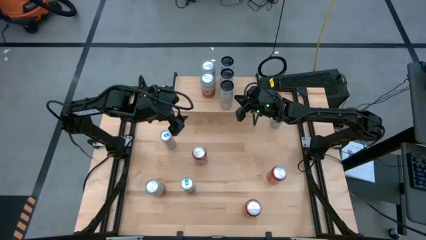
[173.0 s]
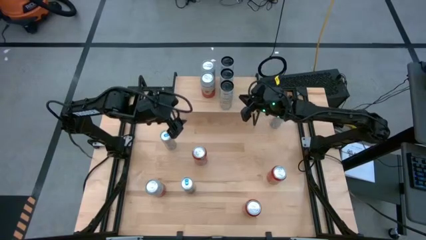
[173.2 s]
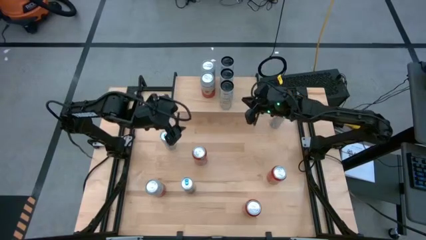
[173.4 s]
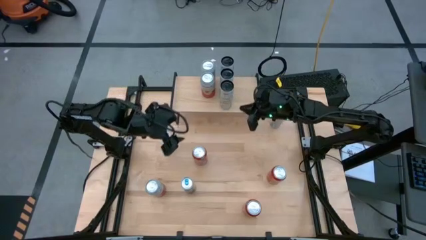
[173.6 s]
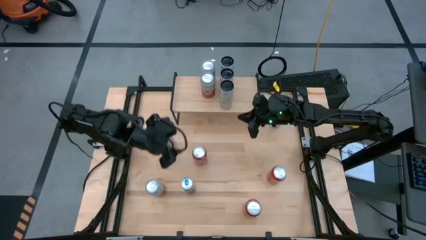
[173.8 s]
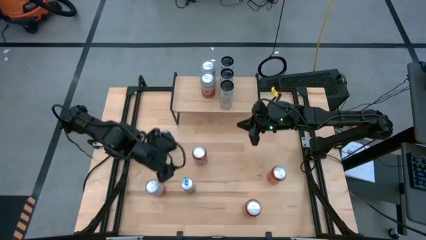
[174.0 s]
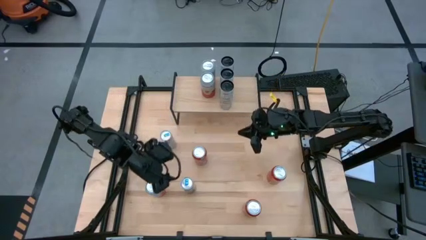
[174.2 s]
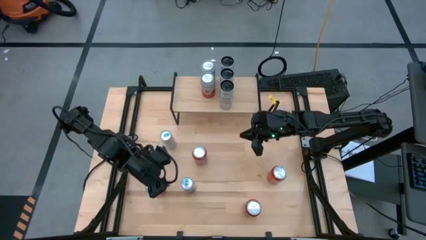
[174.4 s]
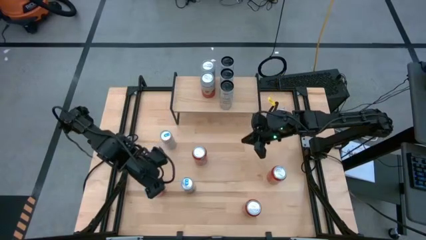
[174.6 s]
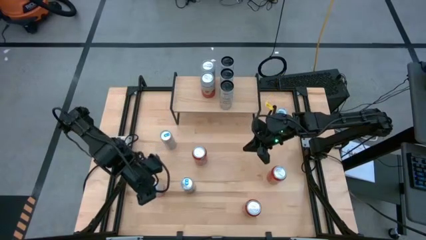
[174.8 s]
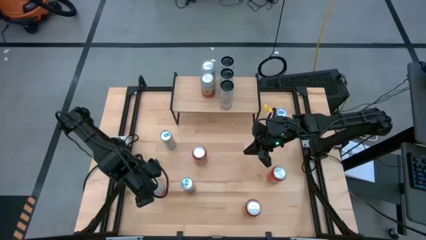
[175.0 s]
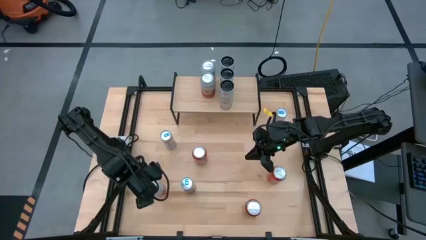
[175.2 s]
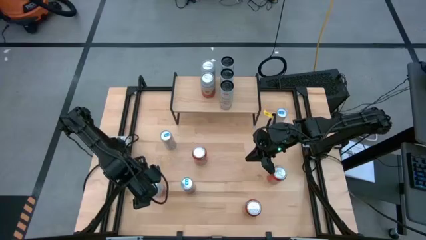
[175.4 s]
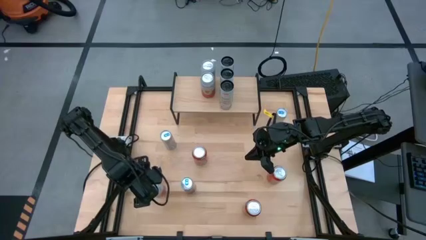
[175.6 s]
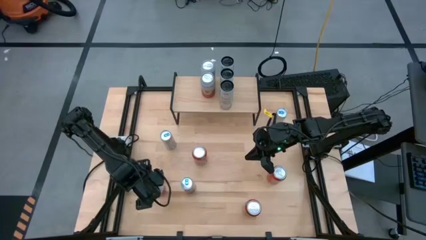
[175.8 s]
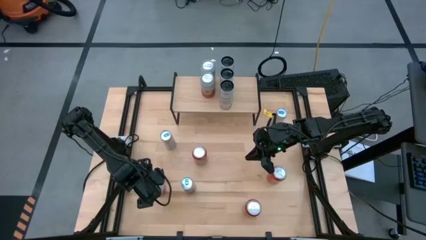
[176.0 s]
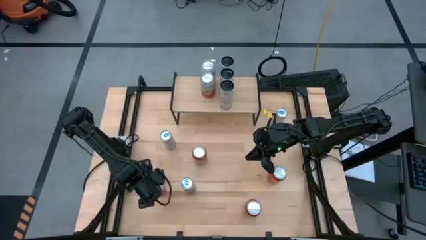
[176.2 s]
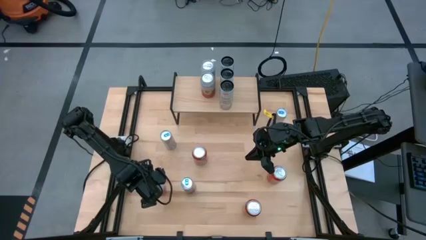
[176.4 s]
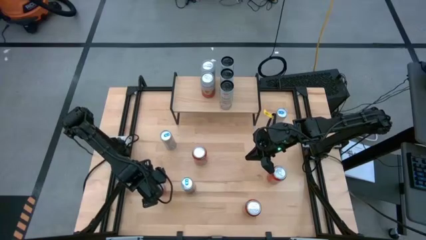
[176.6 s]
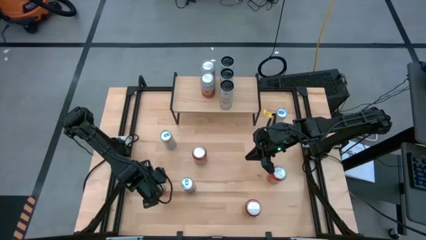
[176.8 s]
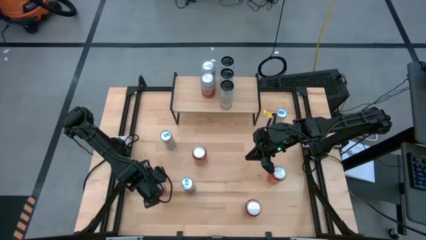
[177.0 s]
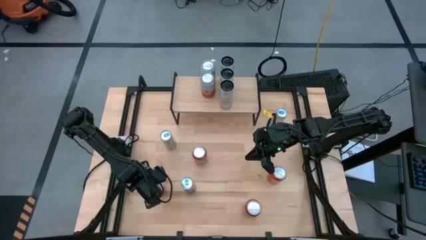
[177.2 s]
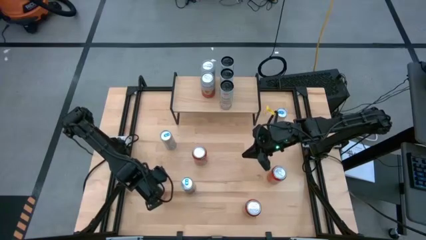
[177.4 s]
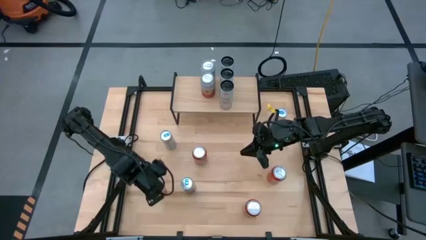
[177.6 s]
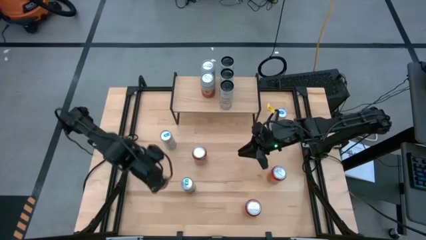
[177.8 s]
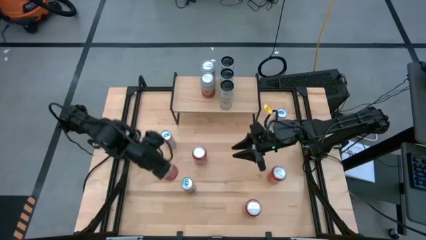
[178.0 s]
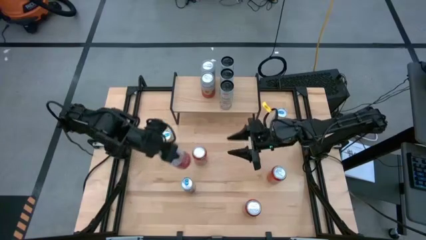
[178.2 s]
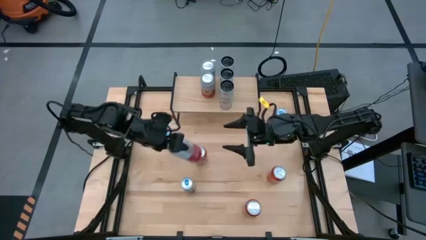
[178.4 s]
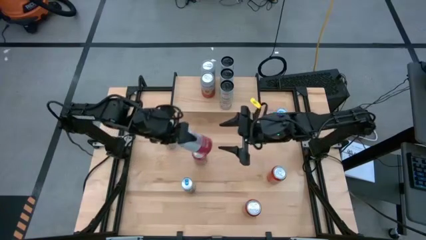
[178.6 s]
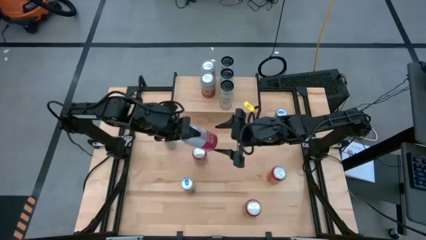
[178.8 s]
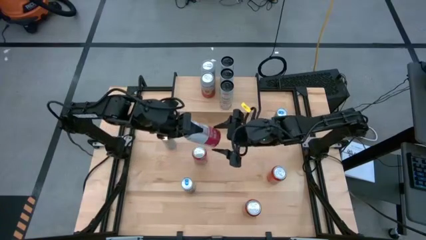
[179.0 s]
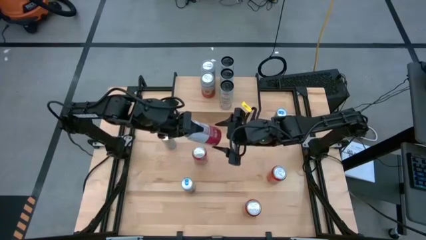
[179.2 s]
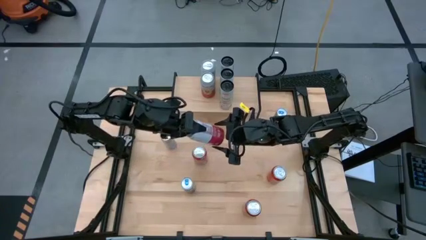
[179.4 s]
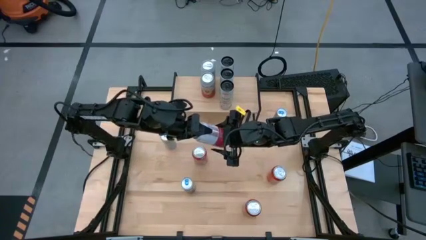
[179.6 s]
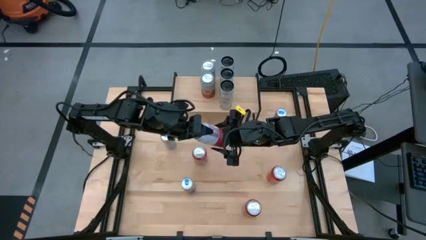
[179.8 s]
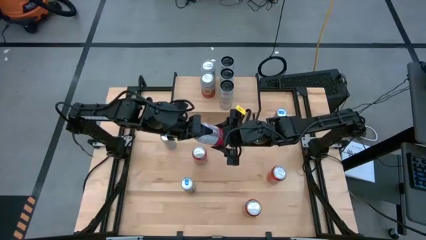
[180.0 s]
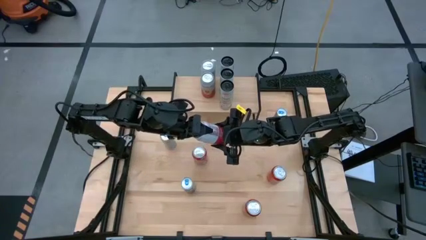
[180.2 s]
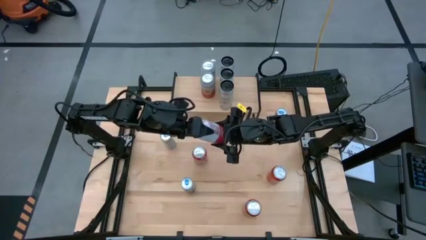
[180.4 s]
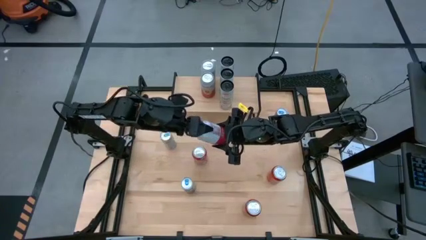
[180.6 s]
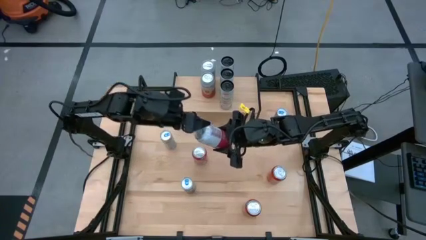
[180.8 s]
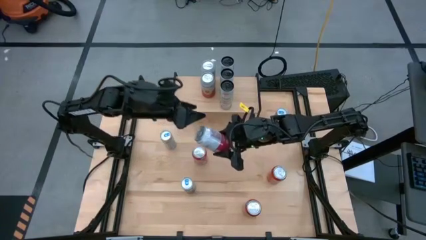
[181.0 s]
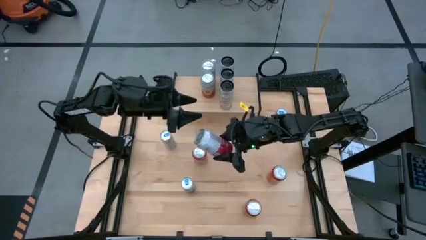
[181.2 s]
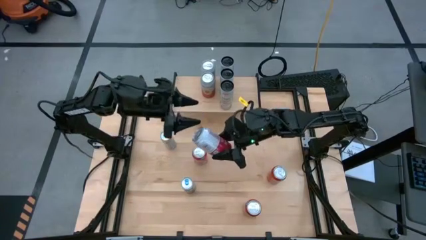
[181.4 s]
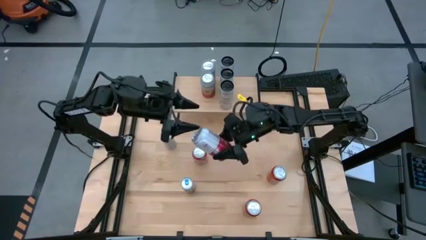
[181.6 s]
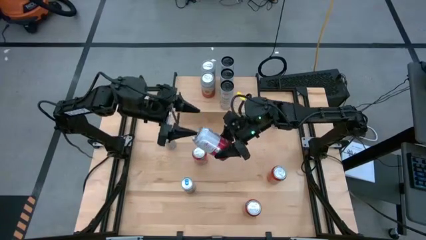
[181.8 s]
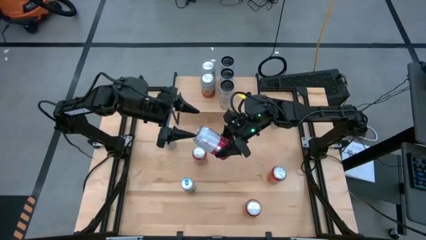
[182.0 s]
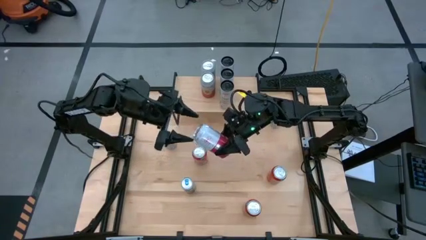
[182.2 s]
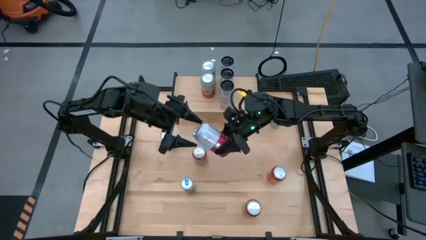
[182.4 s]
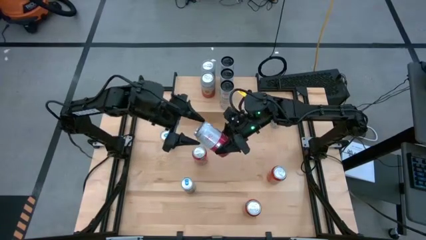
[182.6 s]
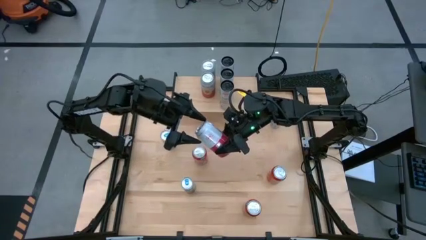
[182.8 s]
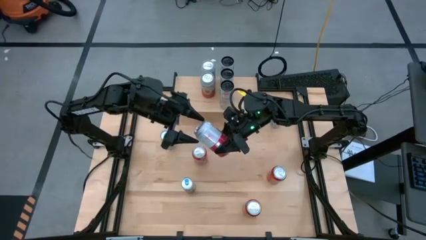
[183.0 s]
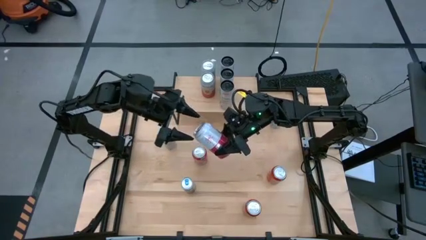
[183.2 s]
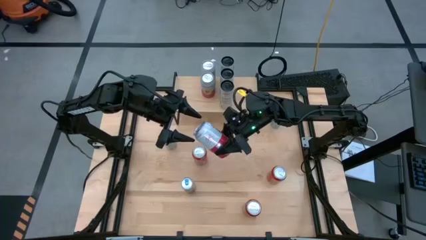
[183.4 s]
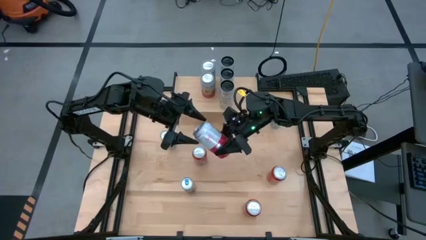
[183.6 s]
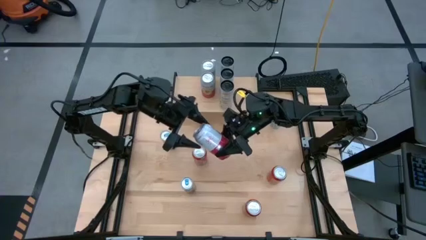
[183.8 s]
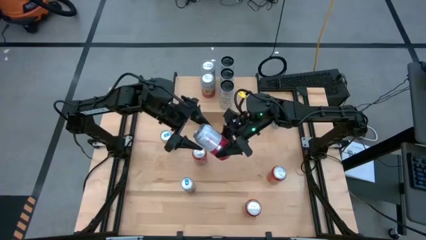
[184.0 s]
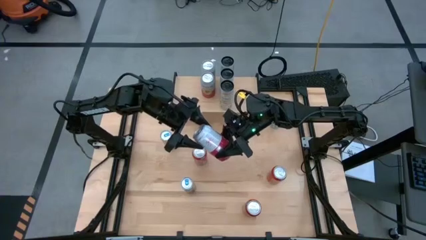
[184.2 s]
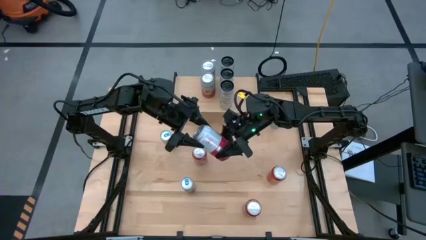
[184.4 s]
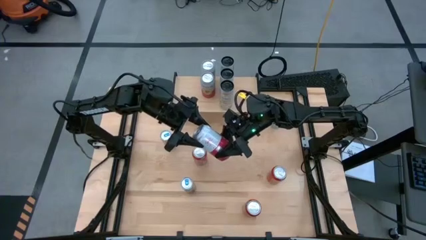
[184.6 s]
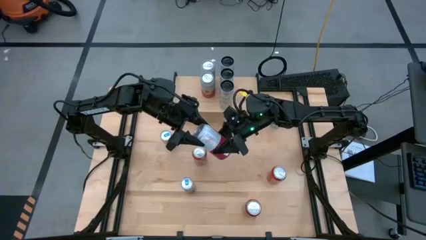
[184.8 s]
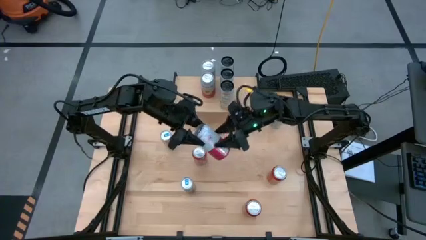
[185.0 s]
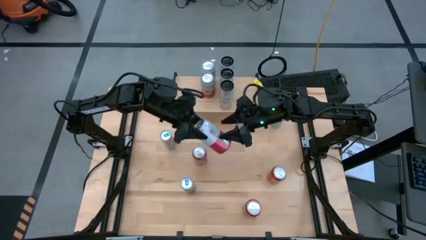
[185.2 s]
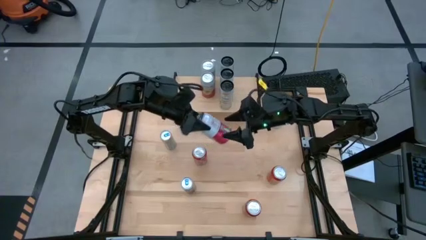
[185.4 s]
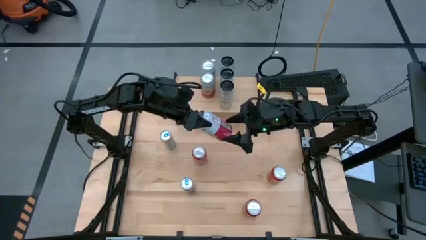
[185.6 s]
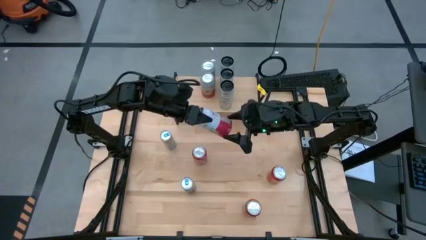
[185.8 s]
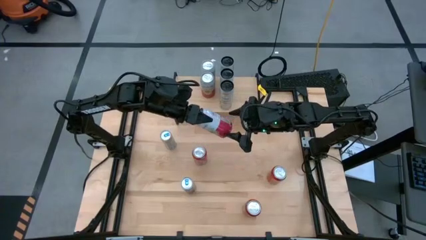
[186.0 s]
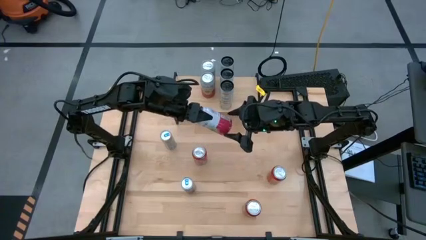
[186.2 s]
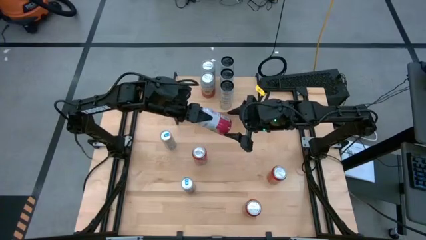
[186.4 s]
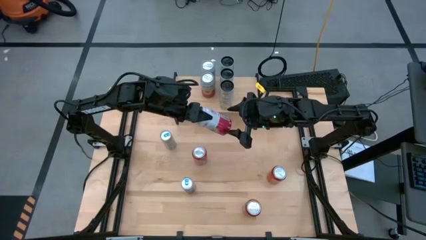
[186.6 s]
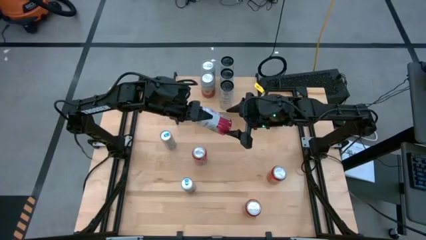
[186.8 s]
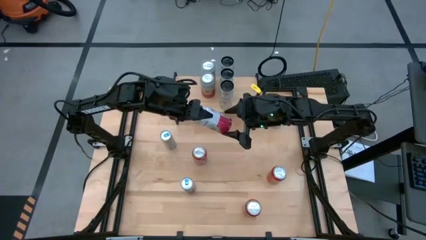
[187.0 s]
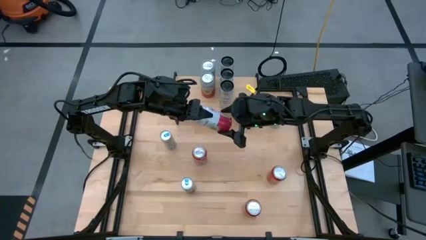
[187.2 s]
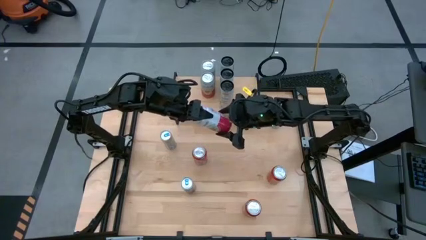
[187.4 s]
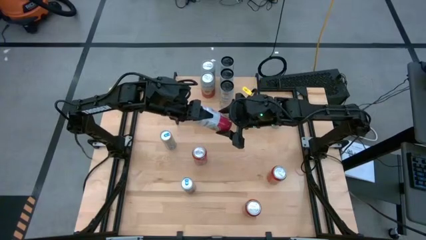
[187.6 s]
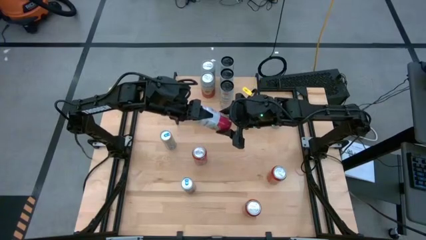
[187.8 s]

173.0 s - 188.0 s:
Task: Place canned beverage on shelf
Put the pink-white soda can aligned with the other pink-white can on the shelf
